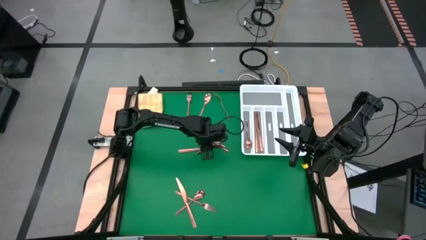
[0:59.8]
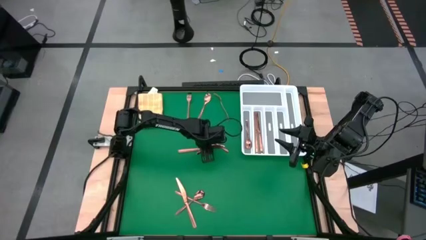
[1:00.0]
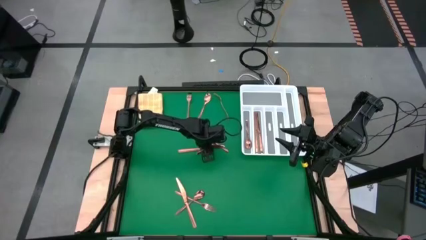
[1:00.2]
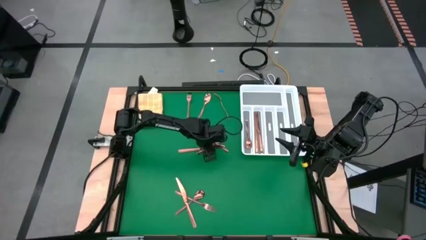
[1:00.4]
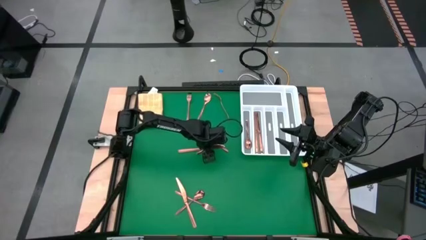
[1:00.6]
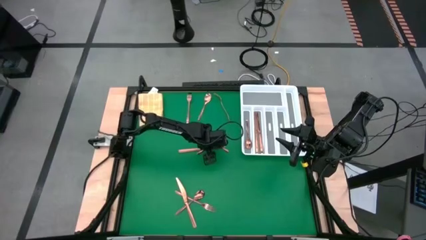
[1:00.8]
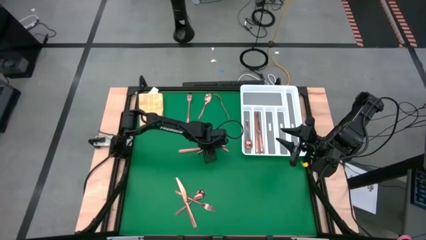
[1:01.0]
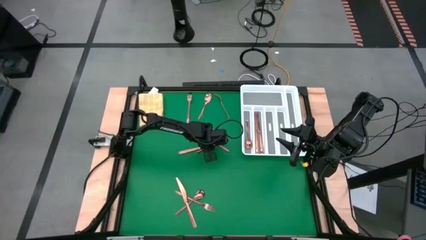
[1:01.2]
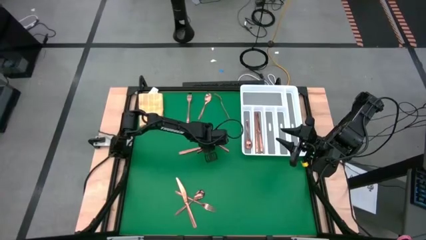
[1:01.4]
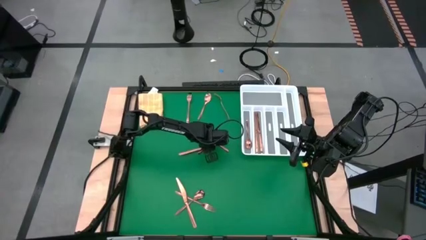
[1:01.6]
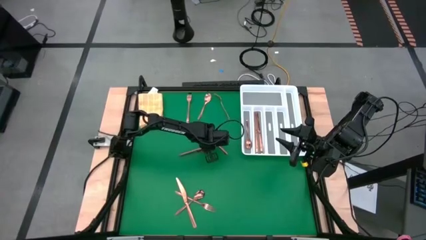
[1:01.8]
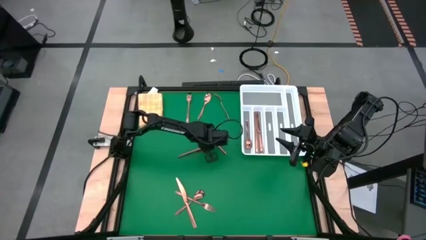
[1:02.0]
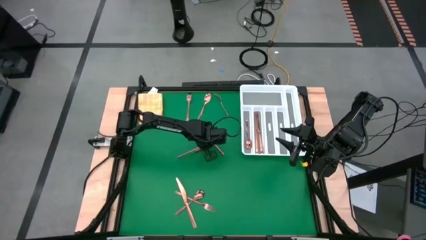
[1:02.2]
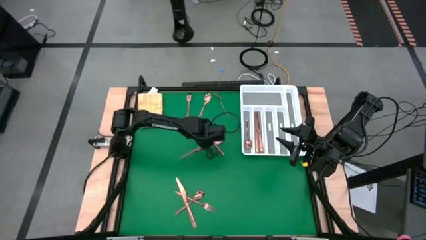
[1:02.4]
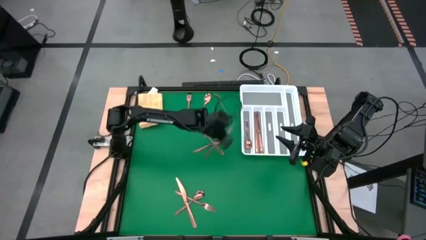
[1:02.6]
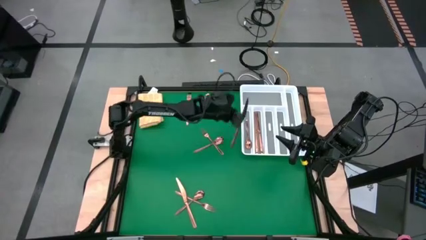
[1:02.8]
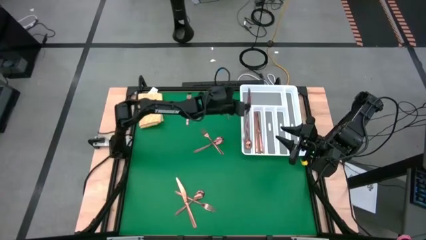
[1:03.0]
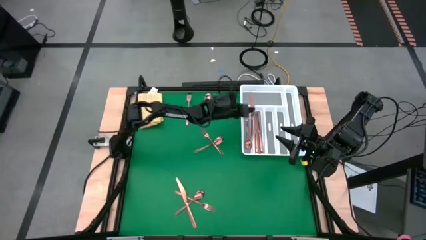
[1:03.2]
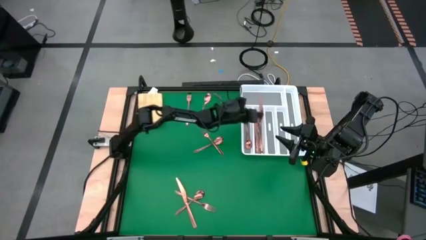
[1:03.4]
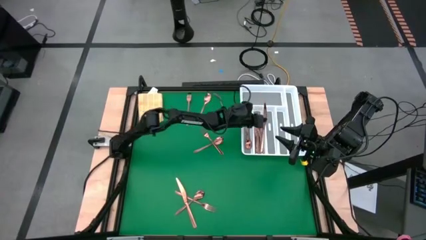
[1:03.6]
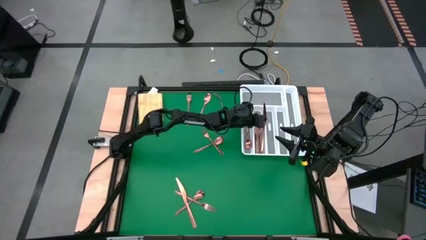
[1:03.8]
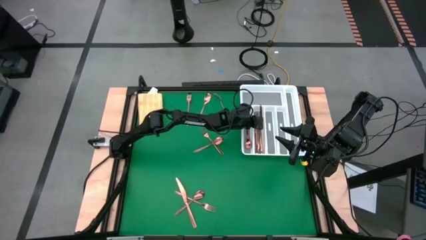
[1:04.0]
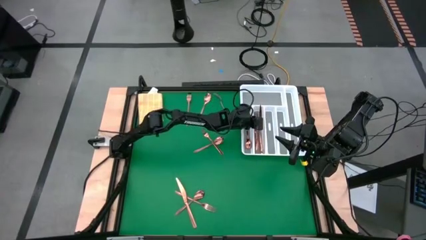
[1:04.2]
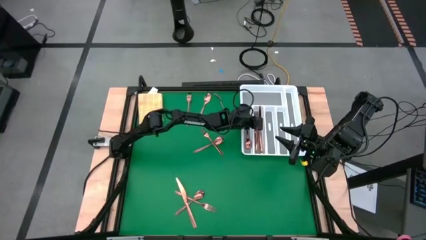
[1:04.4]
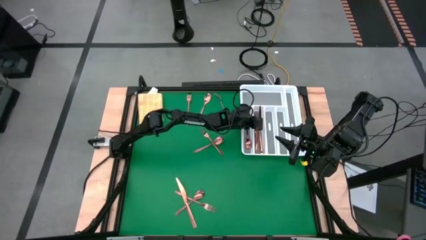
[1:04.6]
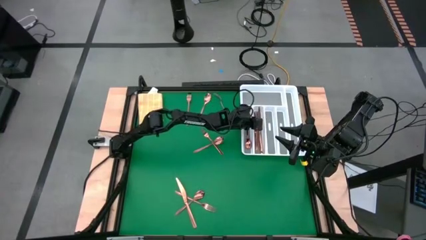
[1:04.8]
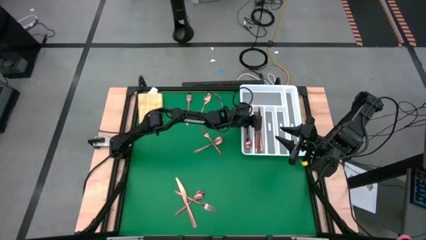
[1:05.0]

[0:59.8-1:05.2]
Task: Sort silverware
Put the gold table knife into the silverware organizer

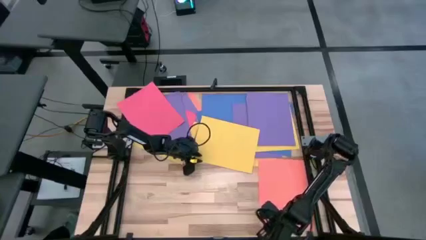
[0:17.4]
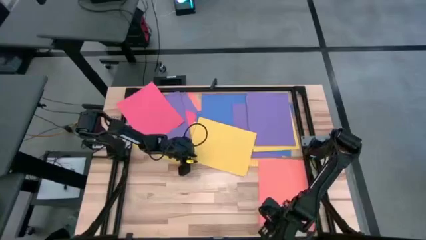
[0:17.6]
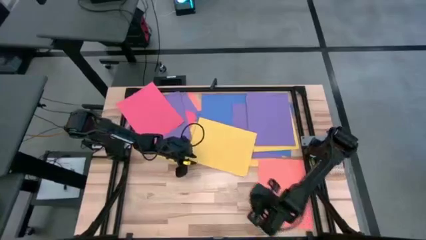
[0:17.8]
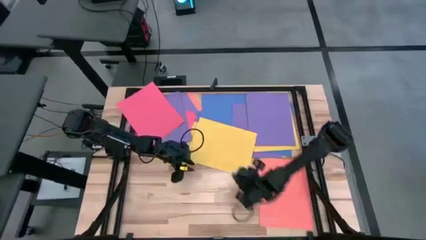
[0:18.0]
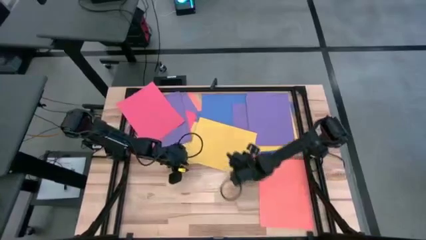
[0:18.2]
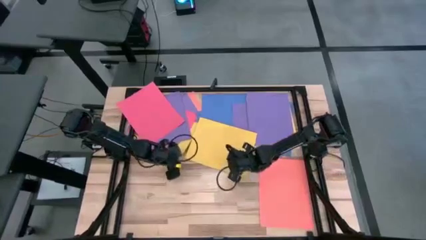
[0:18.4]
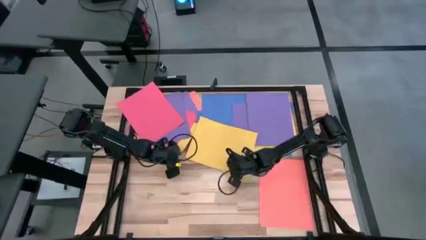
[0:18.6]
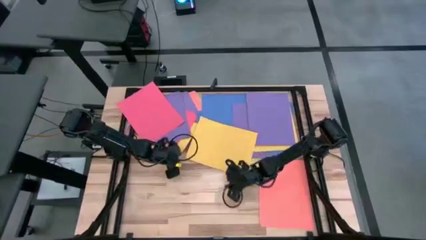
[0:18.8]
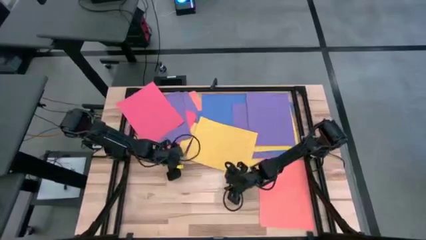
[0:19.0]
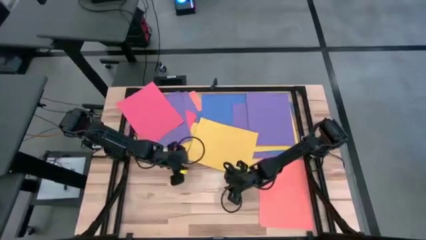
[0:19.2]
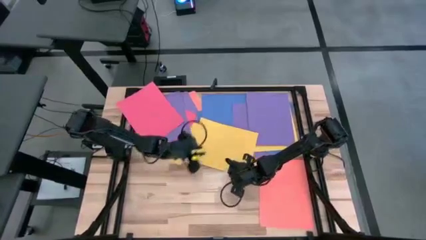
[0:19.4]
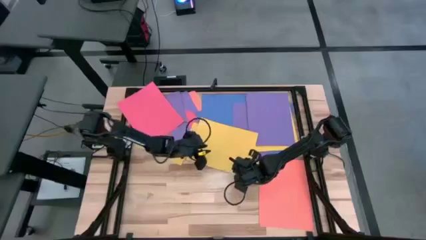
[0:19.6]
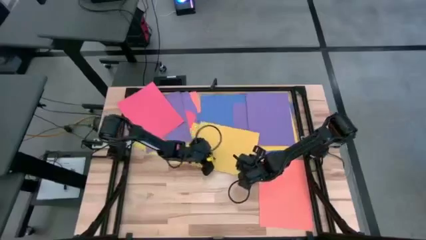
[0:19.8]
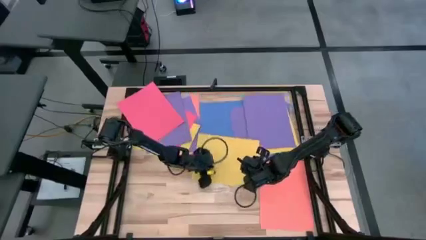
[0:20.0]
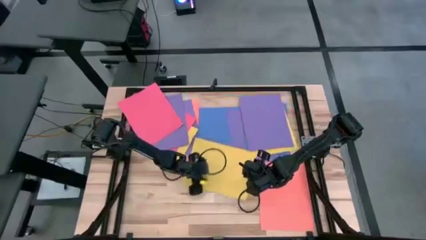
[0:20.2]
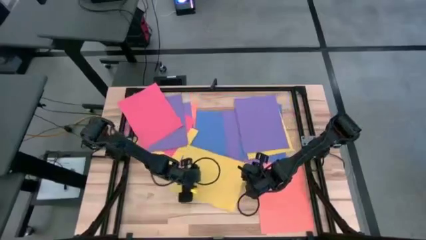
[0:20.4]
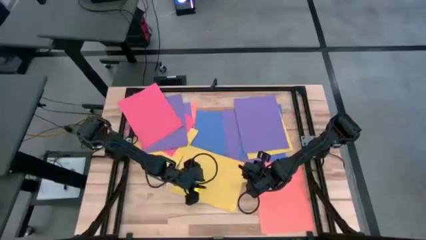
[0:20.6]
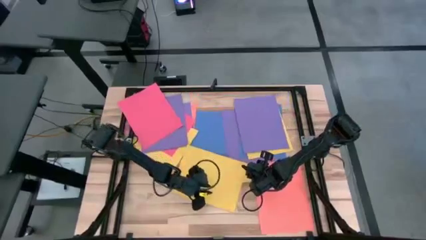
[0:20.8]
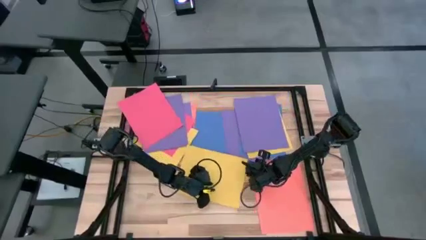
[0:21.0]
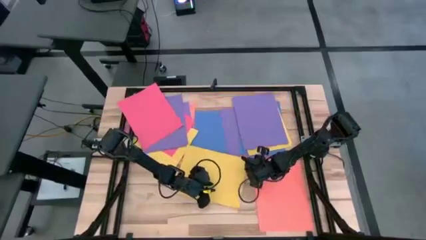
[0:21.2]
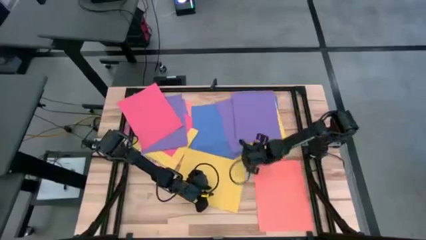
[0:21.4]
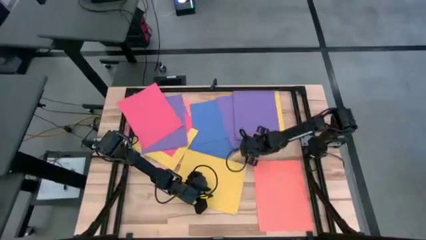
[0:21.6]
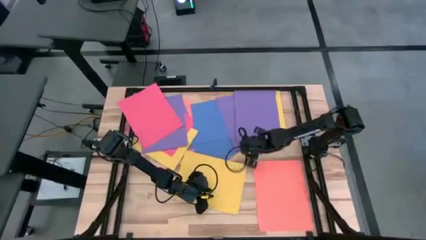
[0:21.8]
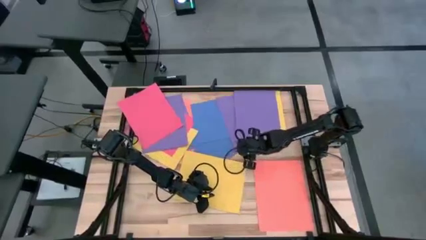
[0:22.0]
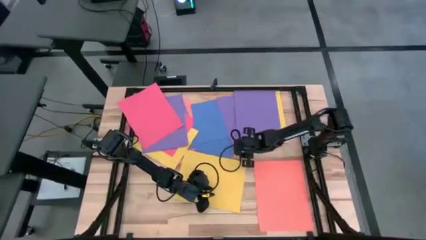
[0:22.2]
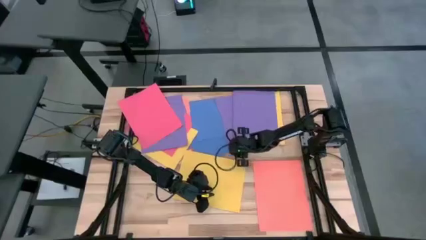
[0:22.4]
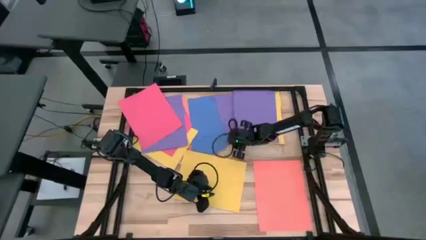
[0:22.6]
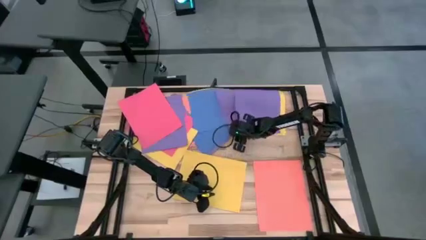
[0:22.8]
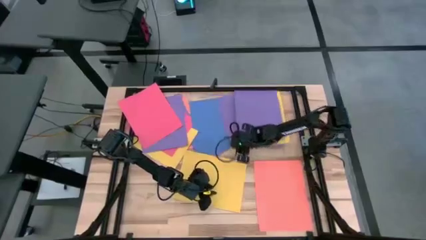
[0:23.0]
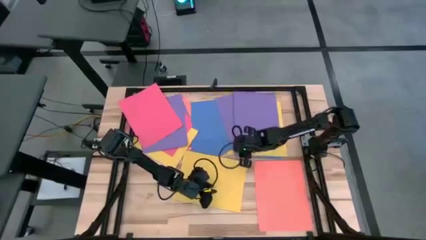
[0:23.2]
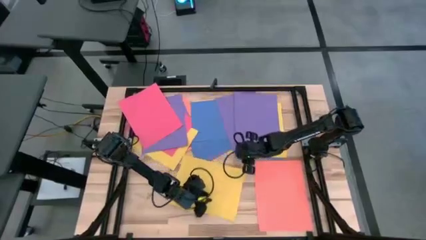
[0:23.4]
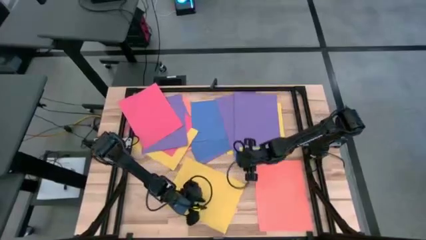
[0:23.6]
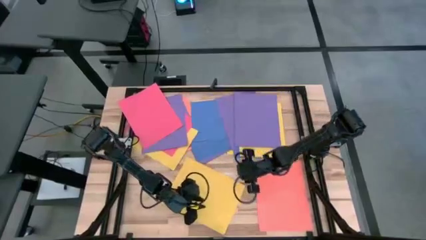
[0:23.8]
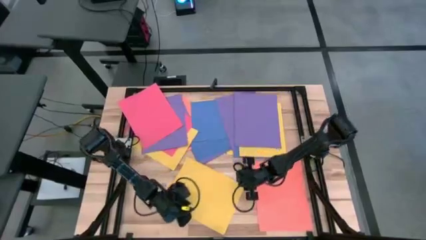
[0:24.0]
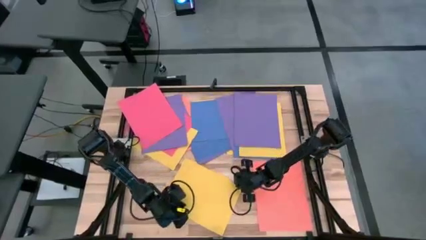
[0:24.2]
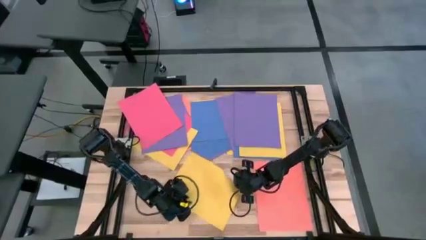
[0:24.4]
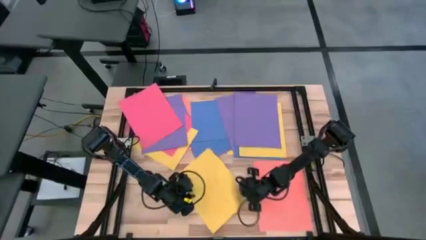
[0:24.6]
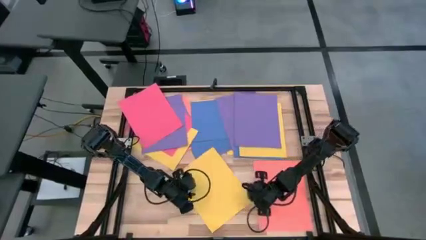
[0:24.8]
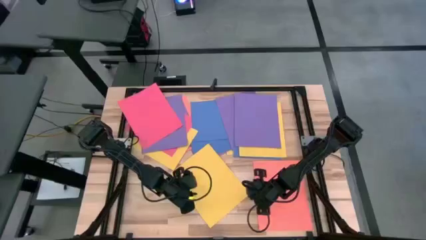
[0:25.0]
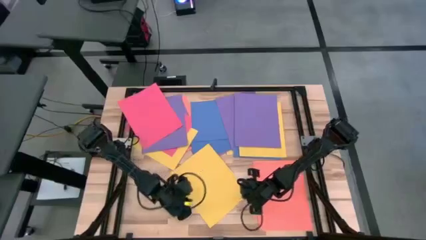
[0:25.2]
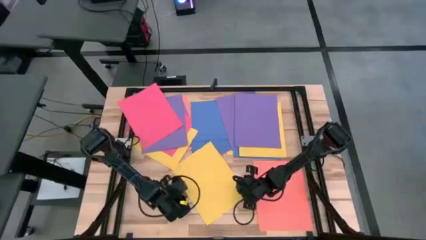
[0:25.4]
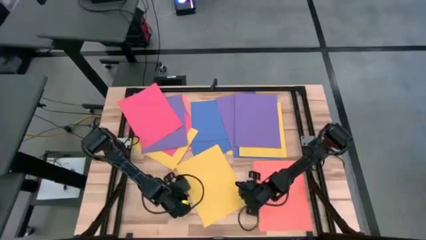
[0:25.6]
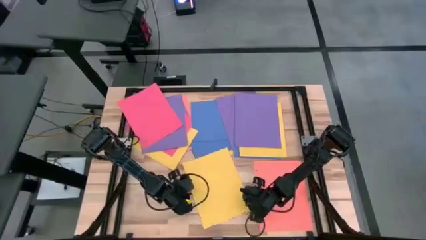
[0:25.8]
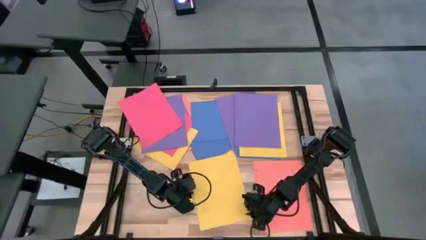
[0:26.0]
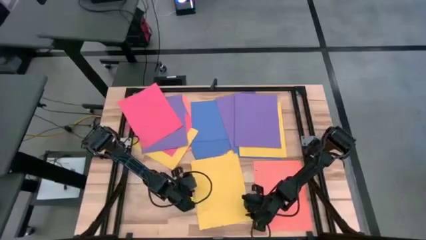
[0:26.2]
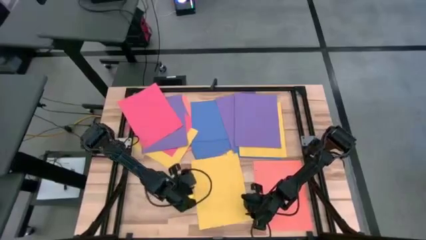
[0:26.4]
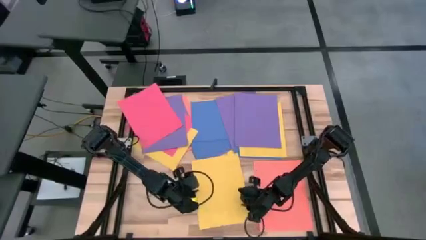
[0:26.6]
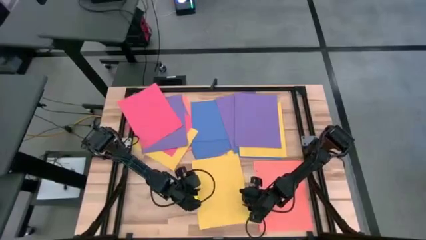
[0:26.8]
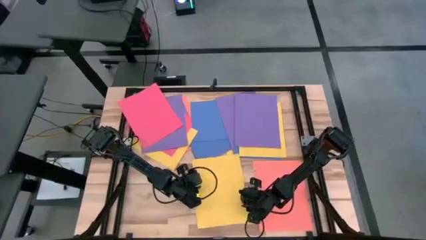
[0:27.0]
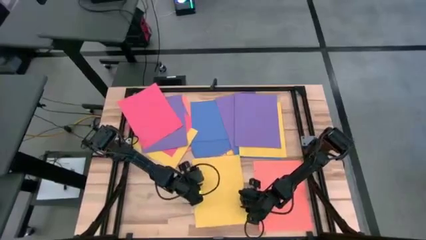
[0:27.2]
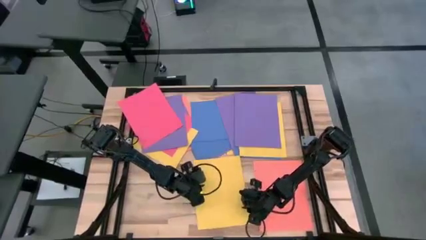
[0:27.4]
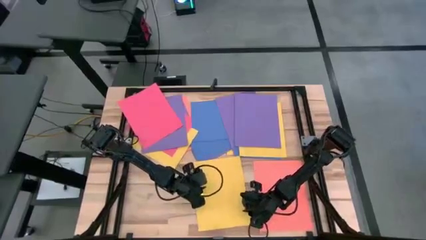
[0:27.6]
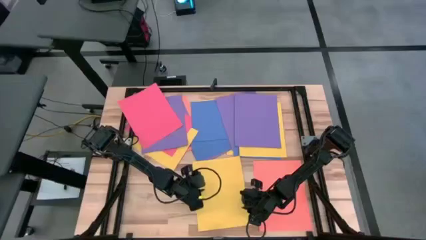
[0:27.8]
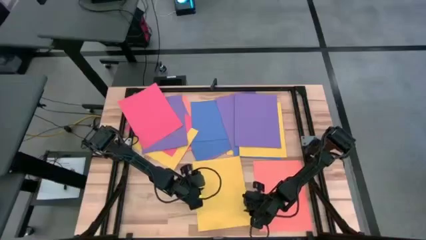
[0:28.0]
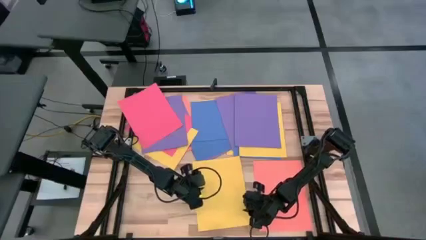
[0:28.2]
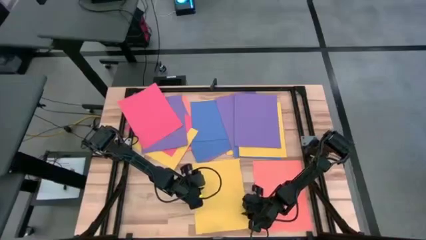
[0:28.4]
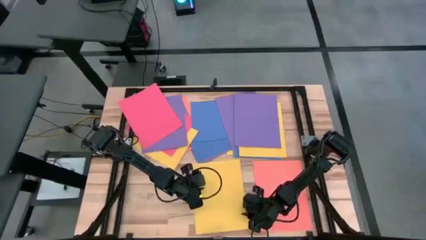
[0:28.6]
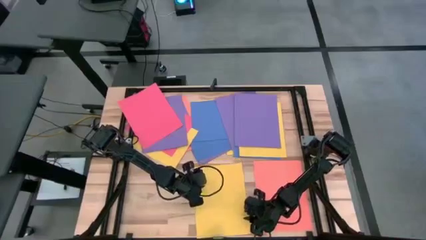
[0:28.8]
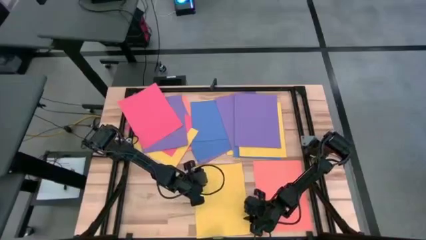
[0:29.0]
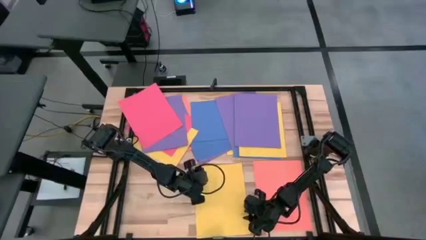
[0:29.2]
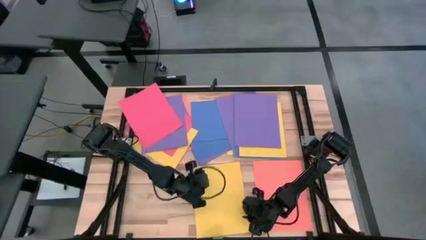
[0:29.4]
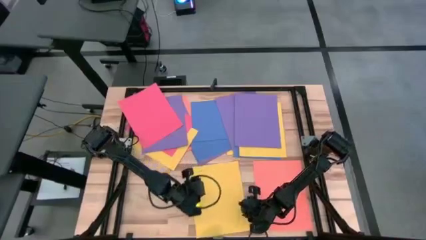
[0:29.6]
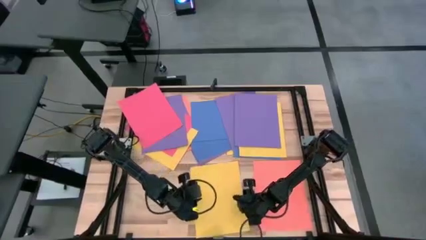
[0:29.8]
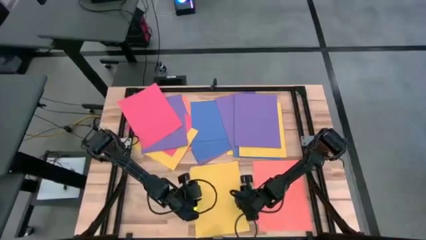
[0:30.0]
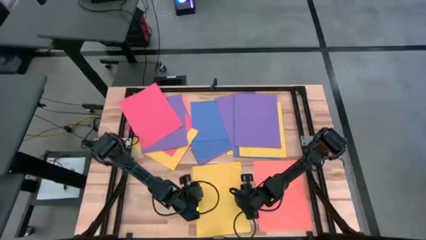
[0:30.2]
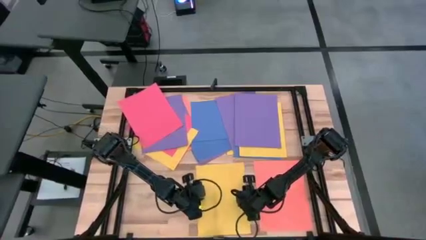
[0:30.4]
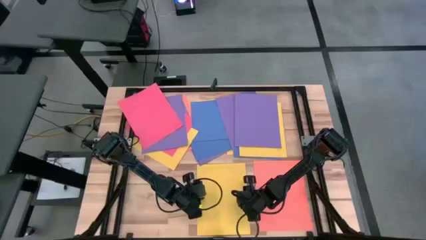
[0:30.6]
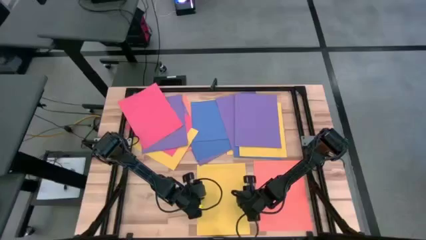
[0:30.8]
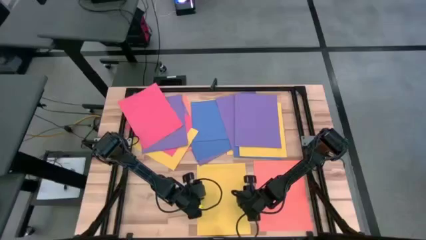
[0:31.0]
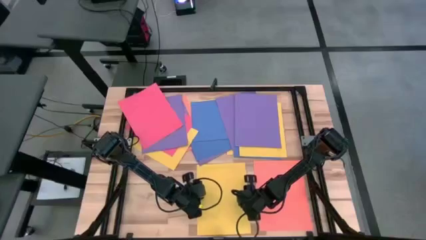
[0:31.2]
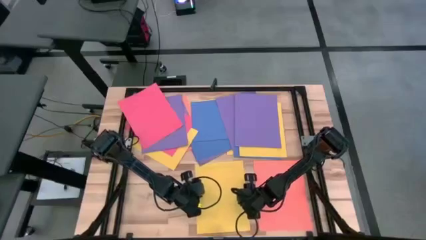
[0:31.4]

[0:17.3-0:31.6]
Task: Organize paper
Put the yellow paper to the bottom center of the table
